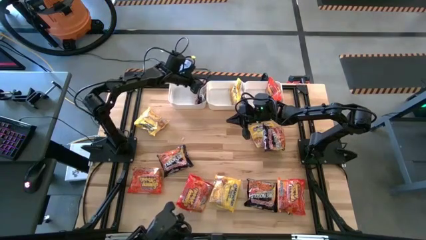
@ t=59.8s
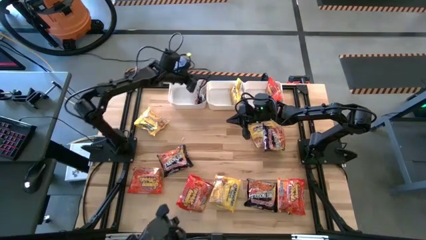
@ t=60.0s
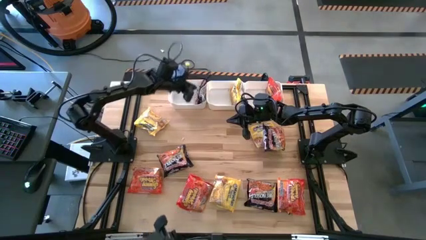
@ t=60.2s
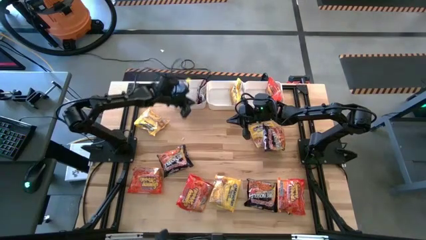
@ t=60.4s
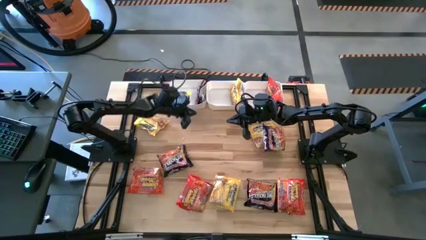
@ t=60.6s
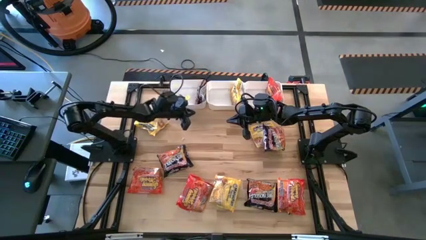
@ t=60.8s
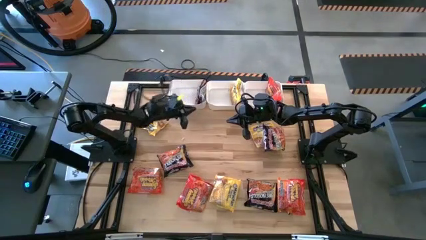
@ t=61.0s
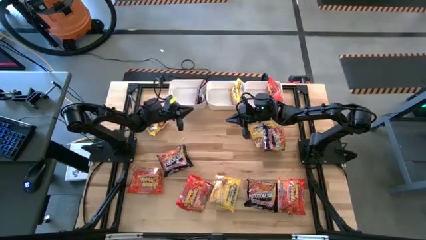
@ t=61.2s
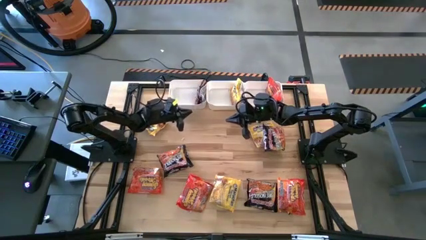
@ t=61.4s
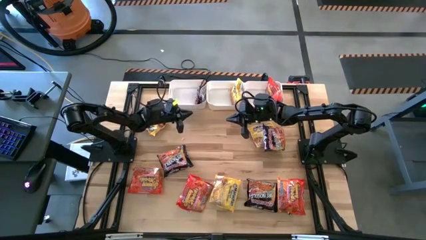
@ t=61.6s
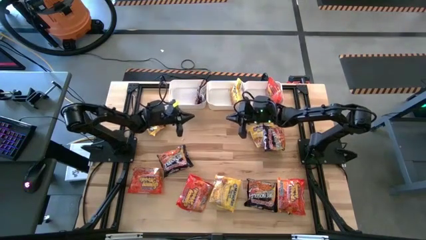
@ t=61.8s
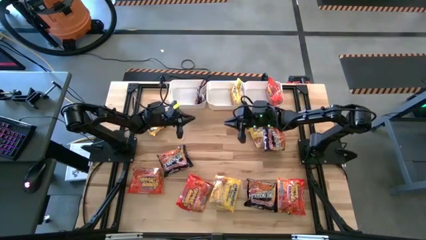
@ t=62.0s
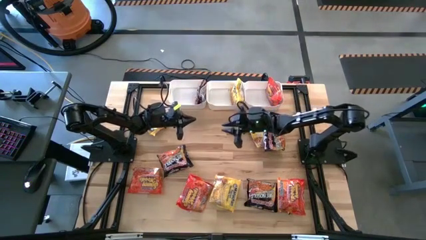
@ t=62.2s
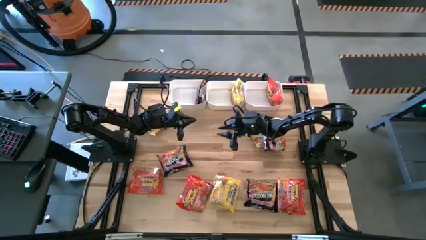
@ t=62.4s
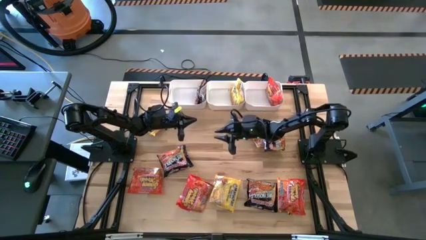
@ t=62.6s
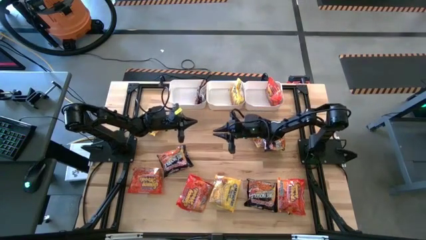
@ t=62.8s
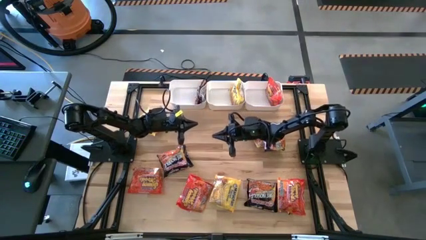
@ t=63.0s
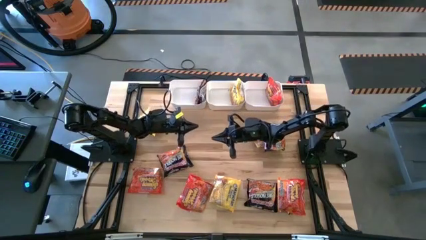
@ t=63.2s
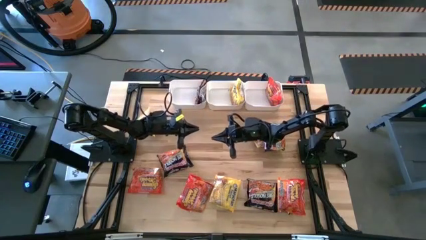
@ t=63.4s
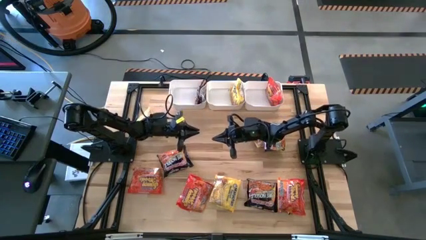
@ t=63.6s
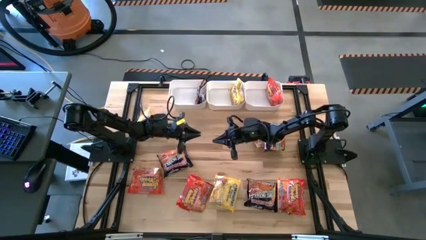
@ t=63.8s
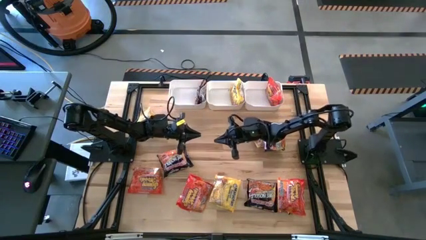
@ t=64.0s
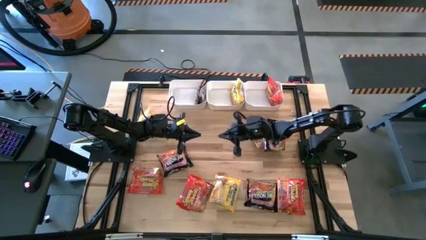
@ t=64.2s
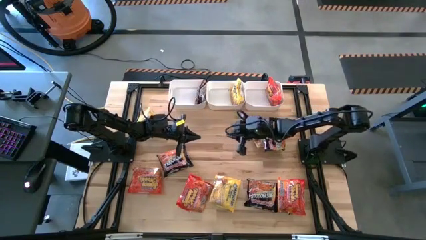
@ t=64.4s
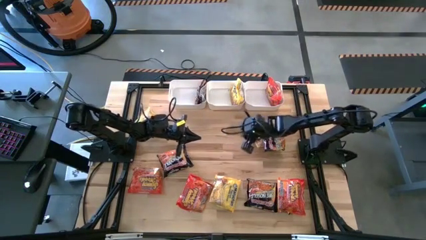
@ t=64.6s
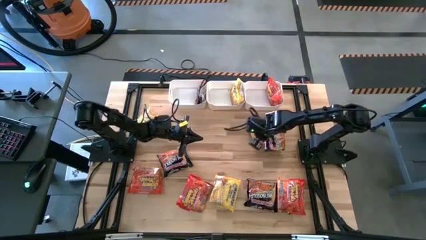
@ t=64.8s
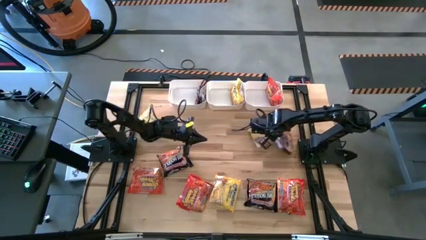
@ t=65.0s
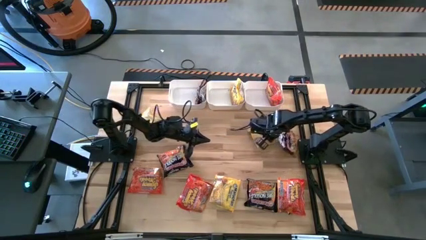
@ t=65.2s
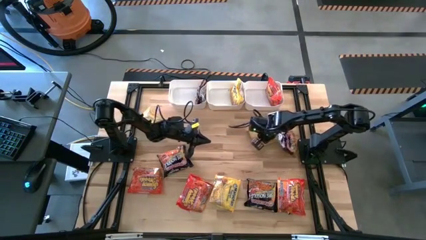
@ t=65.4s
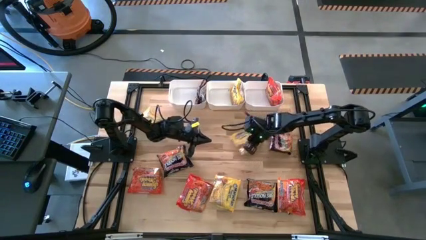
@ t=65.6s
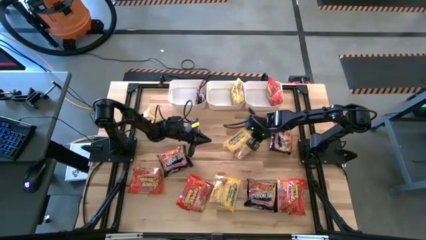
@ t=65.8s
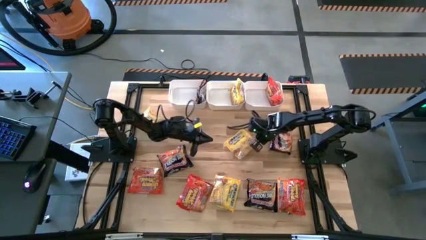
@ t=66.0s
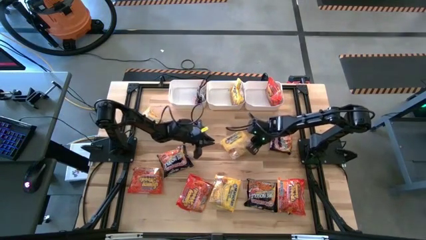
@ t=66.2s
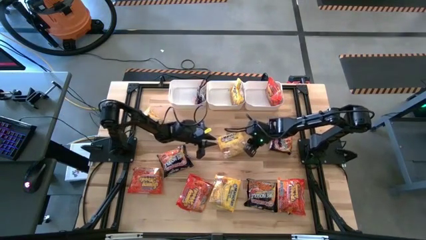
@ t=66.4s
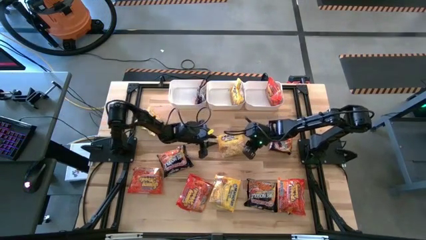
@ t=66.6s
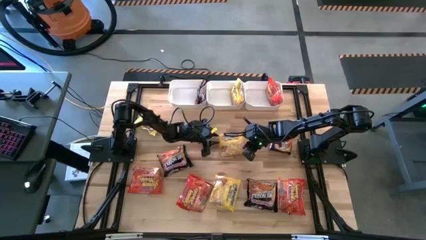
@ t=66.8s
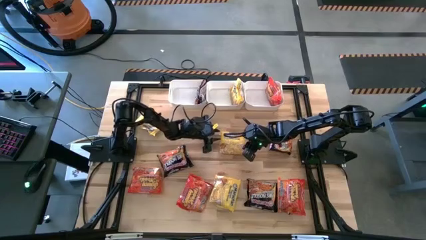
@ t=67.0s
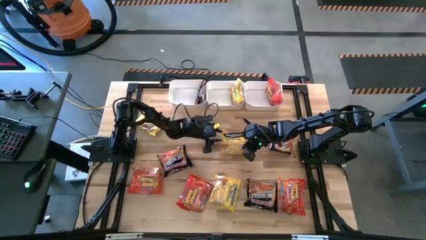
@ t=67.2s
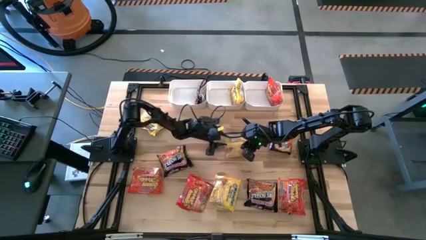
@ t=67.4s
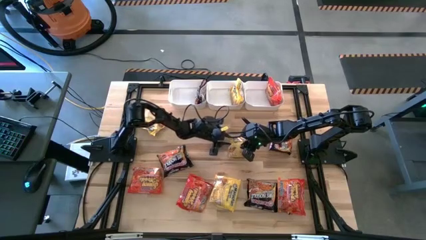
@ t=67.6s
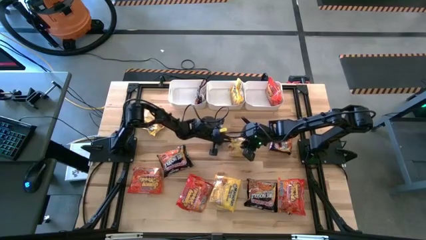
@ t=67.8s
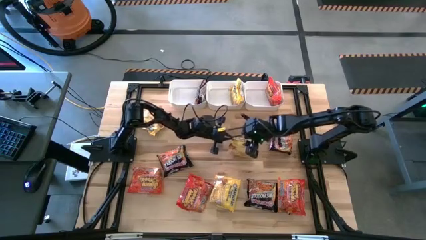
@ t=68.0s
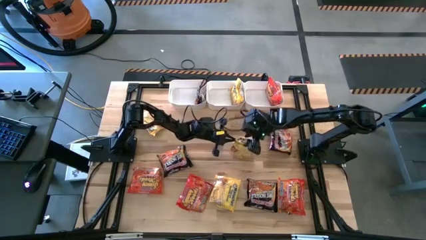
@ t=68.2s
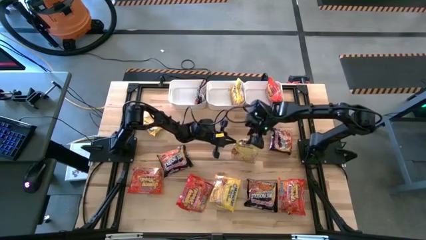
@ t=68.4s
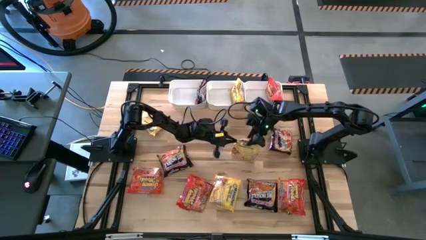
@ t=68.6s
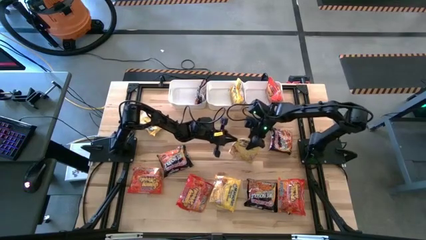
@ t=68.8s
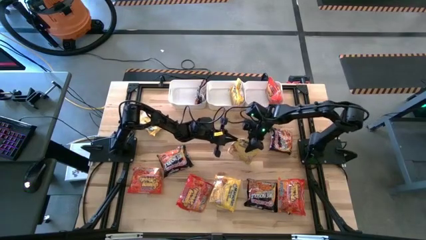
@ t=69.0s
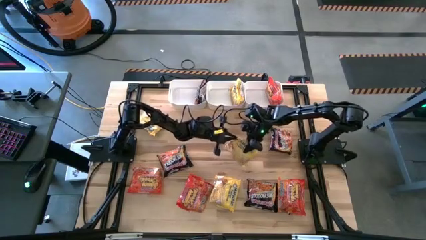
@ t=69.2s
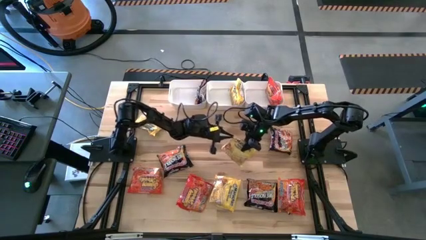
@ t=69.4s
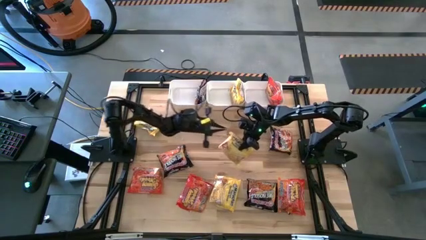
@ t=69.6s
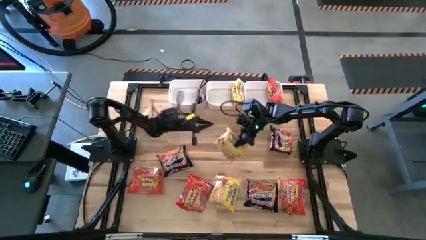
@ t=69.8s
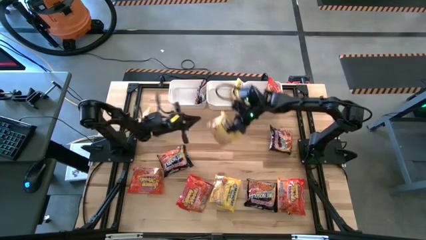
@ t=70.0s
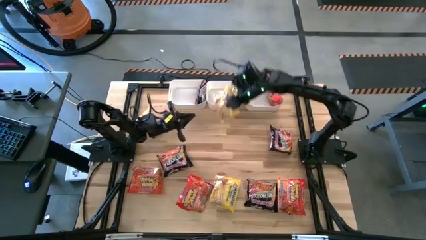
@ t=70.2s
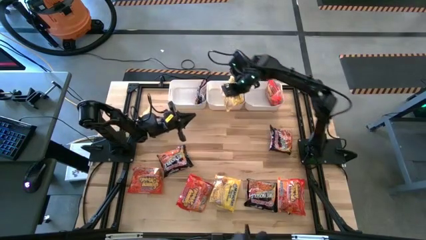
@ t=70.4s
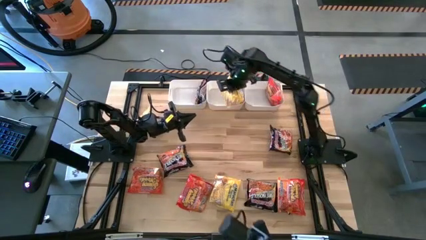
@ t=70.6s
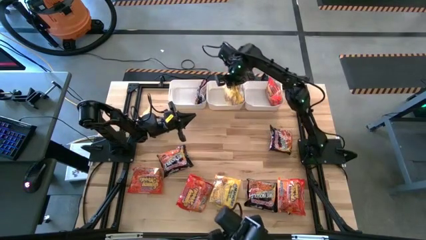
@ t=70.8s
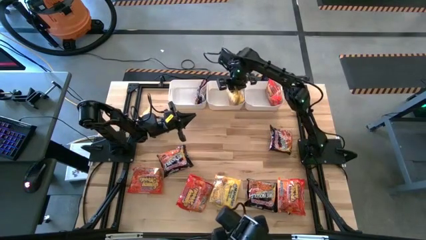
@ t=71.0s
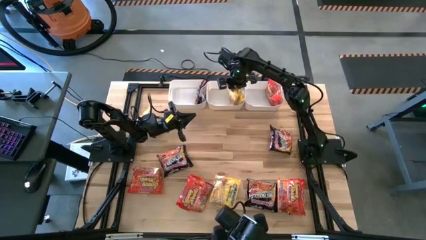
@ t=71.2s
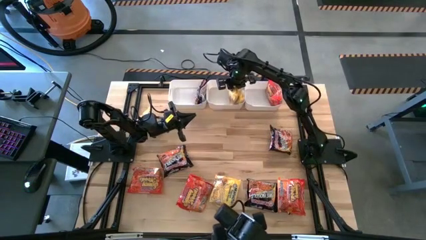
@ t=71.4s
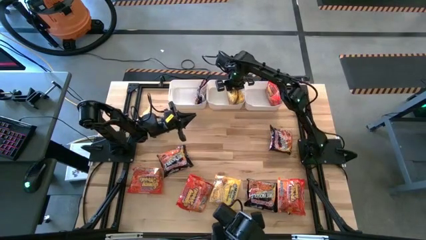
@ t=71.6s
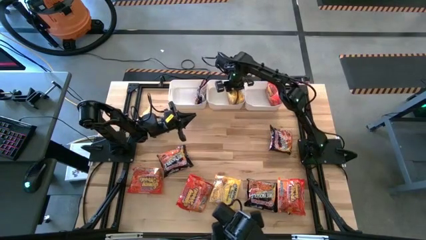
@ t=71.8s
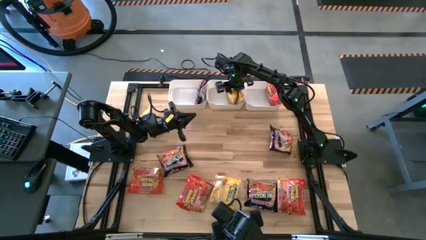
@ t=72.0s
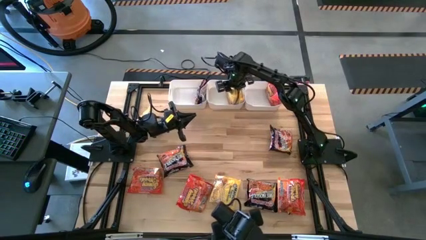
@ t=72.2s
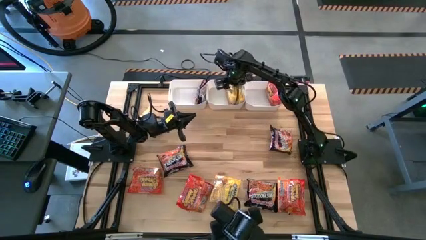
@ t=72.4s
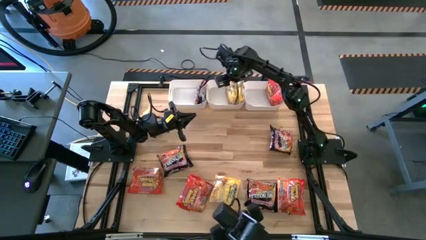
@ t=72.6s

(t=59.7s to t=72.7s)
Task: Sort Maruchan noodles
Put the yellow noodle into the center white bin

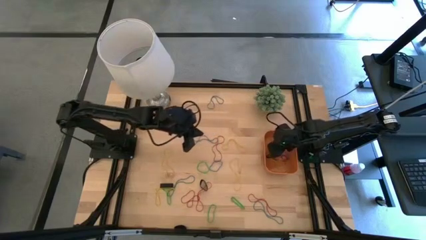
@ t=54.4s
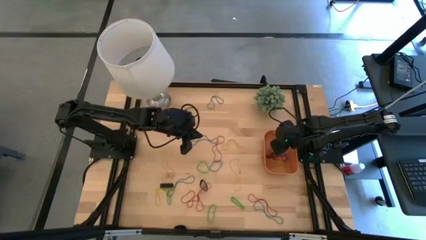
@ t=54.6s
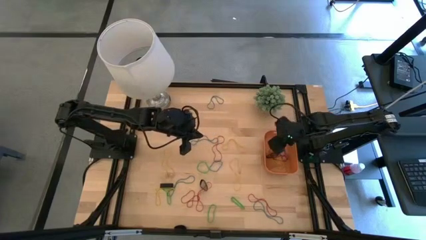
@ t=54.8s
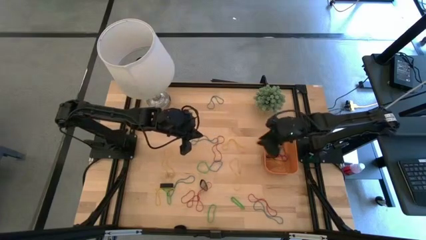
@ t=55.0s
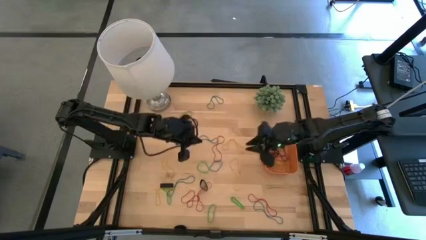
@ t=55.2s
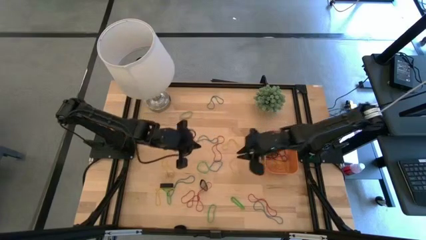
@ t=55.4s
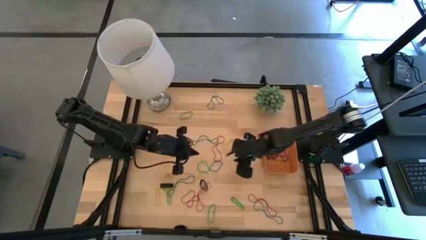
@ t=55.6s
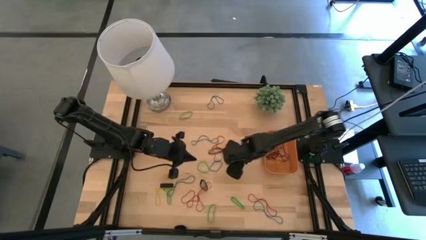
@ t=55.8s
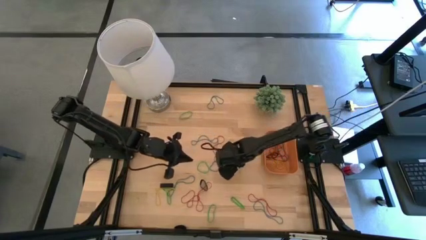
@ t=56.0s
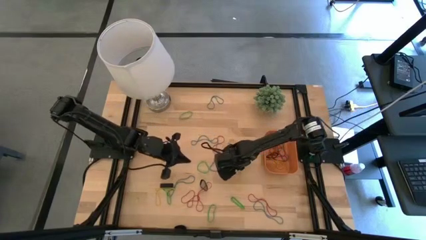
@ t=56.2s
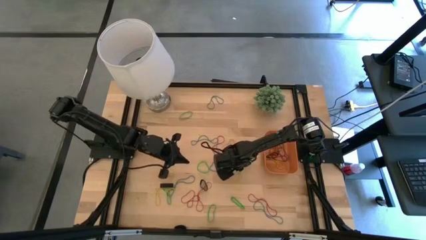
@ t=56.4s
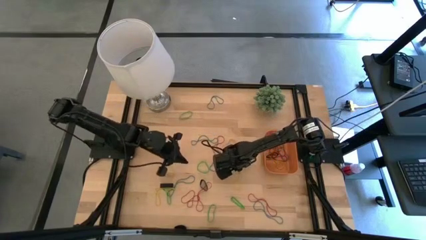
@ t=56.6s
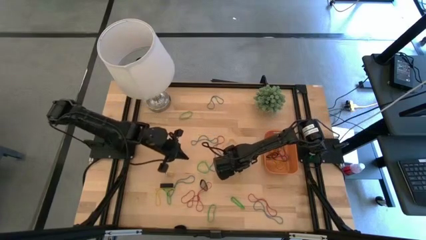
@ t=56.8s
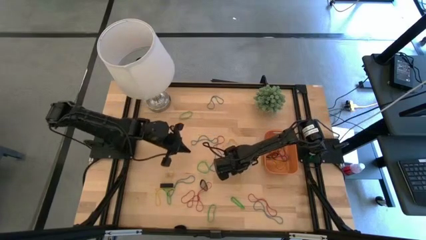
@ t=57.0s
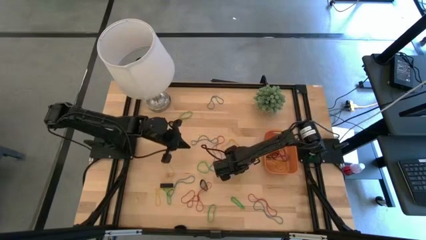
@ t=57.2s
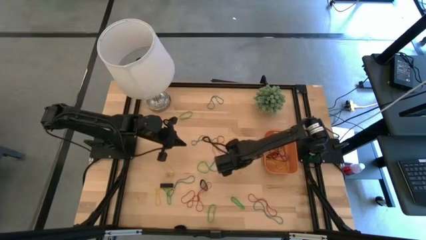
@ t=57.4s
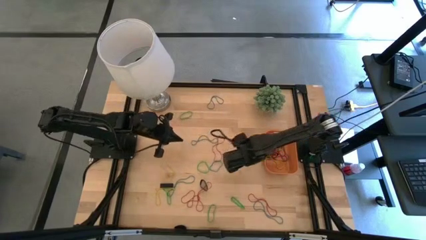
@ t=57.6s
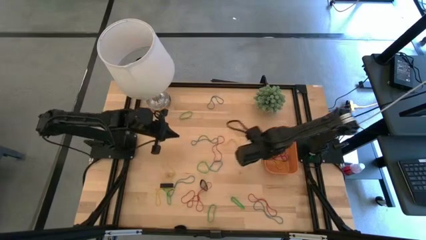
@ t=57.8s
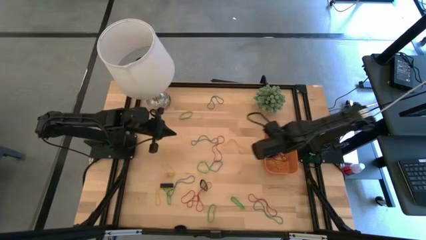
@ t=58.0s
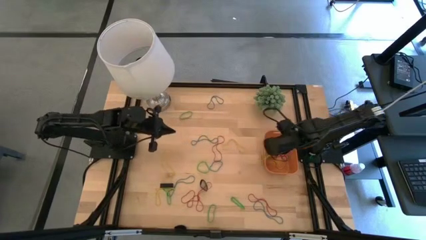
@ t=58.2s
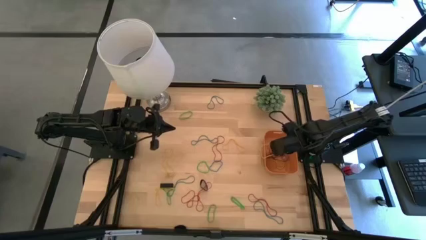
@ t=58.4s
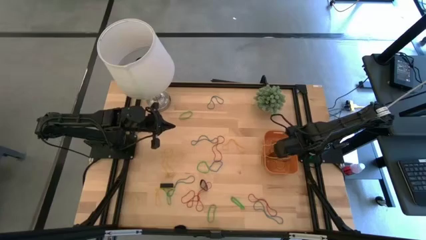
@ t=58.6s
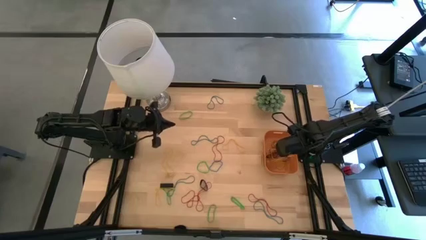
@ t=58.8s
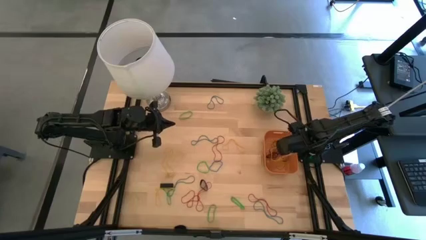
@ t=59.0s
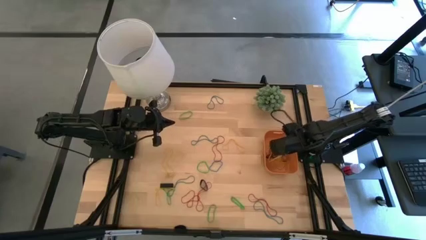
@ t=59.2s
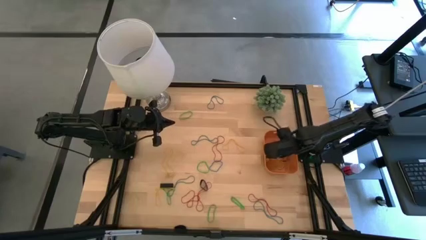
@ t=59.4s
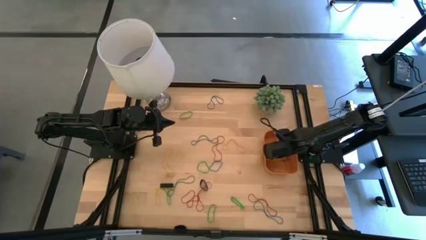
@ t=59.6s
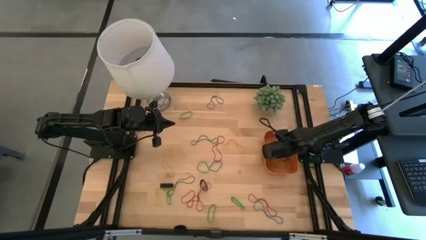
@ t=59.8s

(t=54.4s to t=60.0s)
Task: Pick and place rubber bands into bin
Put the yellow rubber band into the orange bin
